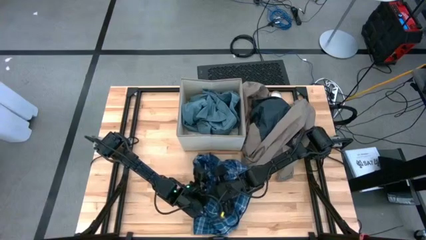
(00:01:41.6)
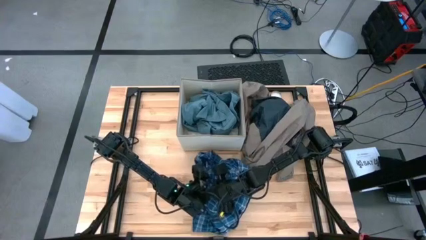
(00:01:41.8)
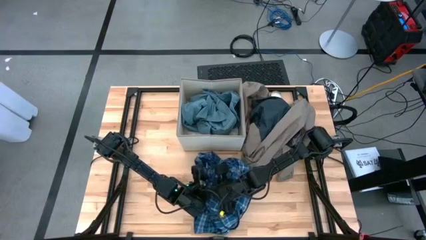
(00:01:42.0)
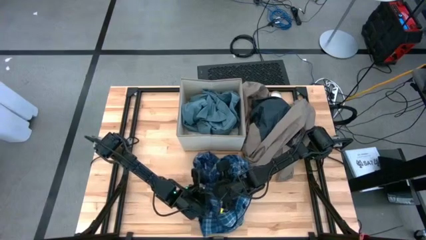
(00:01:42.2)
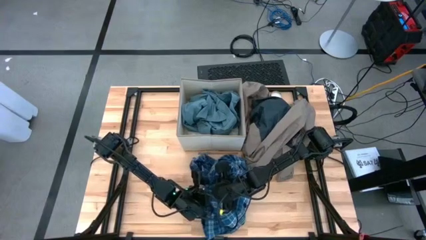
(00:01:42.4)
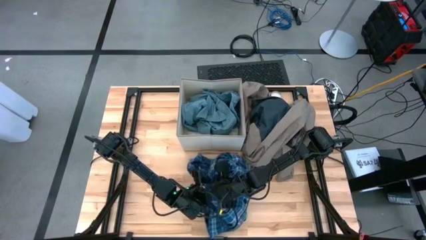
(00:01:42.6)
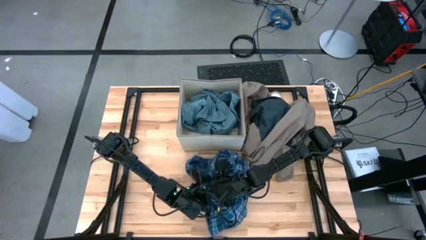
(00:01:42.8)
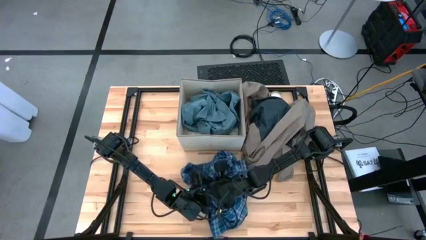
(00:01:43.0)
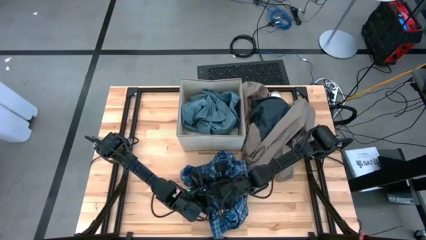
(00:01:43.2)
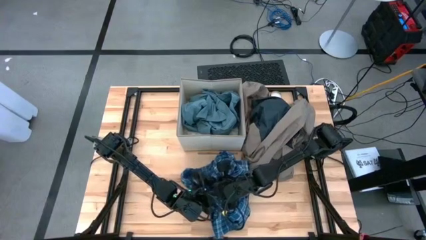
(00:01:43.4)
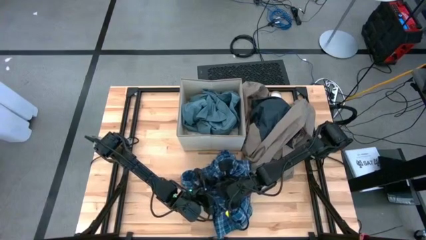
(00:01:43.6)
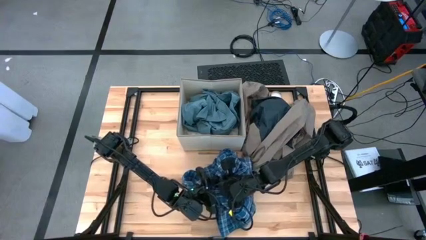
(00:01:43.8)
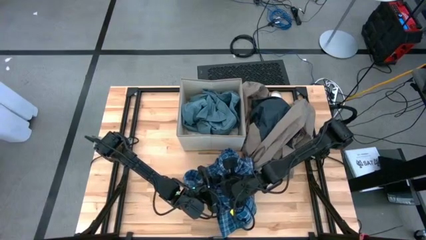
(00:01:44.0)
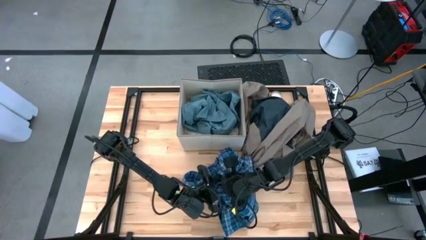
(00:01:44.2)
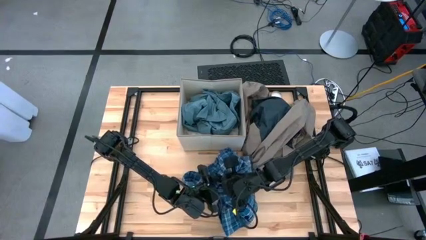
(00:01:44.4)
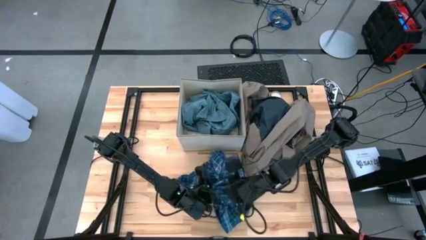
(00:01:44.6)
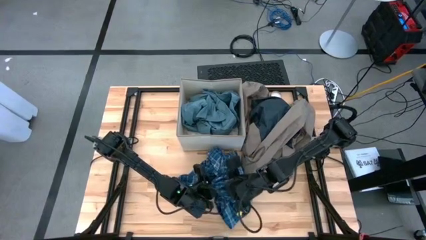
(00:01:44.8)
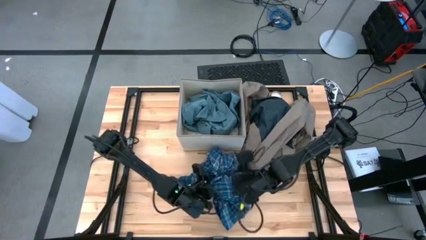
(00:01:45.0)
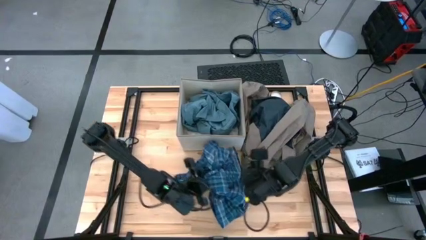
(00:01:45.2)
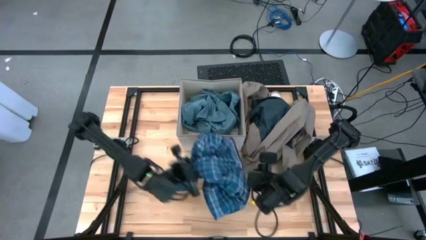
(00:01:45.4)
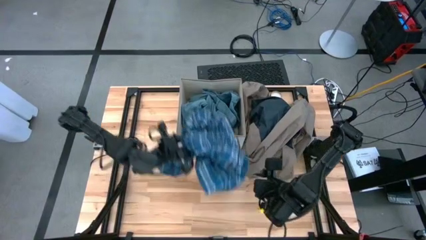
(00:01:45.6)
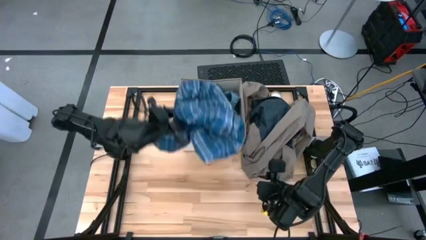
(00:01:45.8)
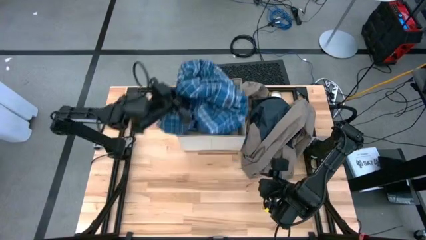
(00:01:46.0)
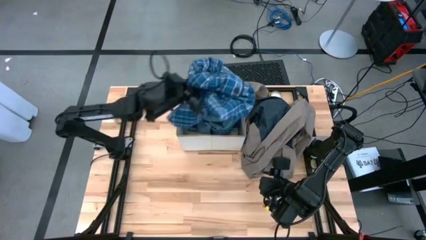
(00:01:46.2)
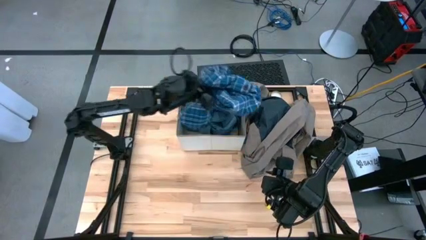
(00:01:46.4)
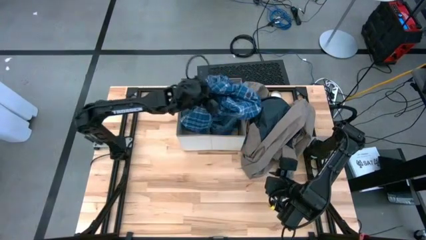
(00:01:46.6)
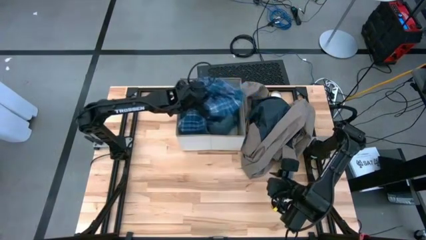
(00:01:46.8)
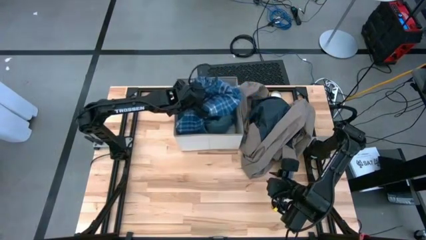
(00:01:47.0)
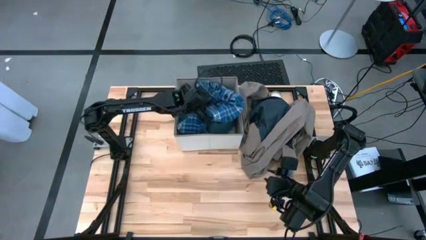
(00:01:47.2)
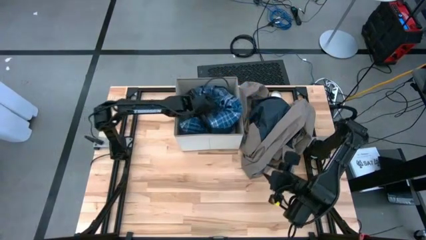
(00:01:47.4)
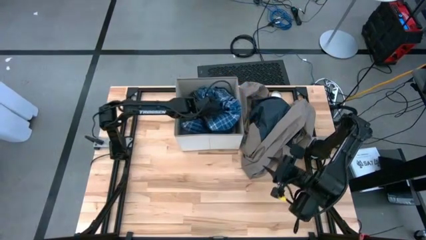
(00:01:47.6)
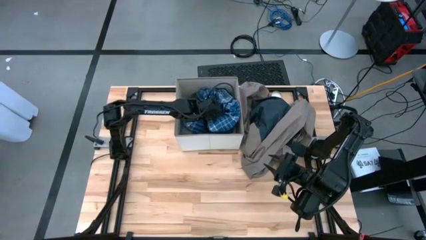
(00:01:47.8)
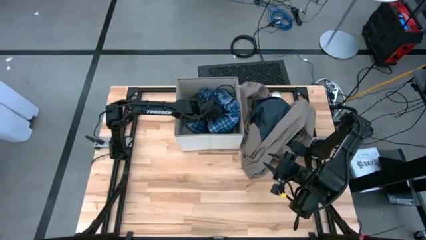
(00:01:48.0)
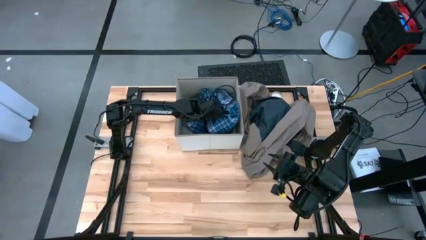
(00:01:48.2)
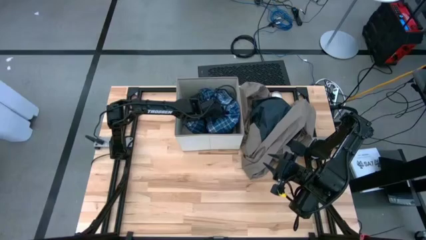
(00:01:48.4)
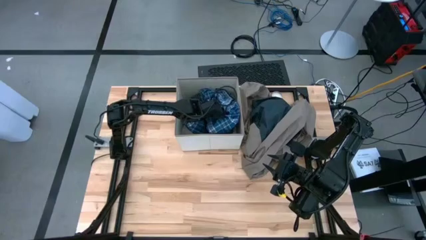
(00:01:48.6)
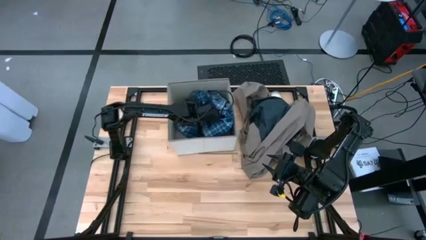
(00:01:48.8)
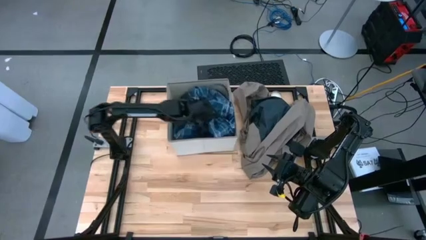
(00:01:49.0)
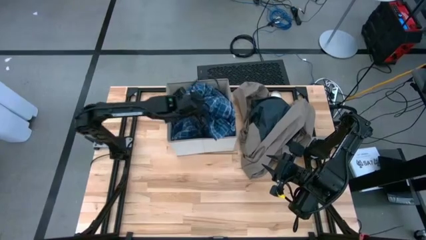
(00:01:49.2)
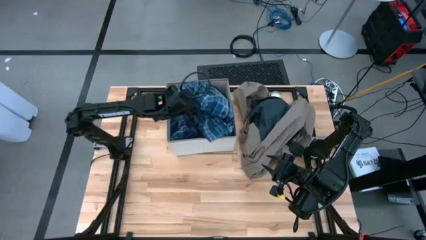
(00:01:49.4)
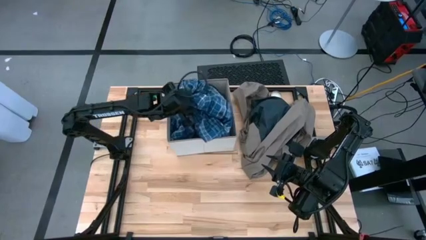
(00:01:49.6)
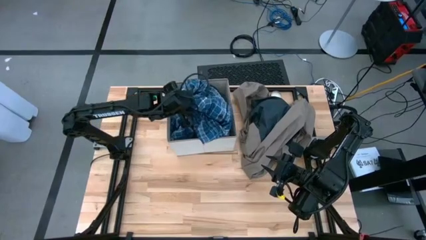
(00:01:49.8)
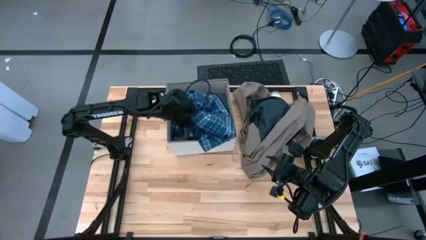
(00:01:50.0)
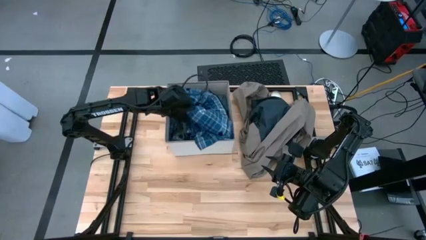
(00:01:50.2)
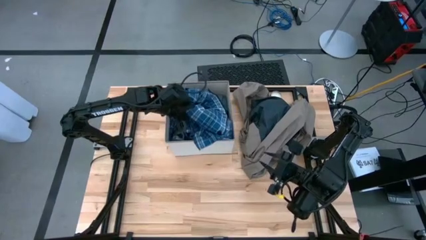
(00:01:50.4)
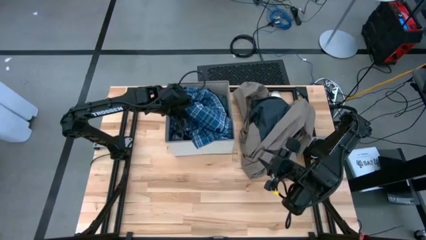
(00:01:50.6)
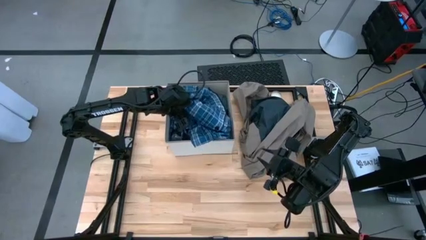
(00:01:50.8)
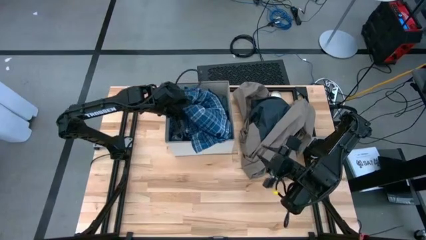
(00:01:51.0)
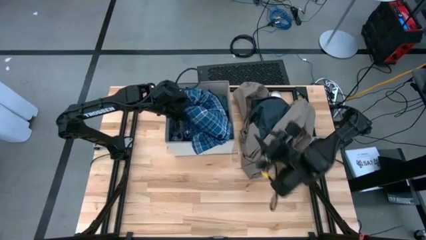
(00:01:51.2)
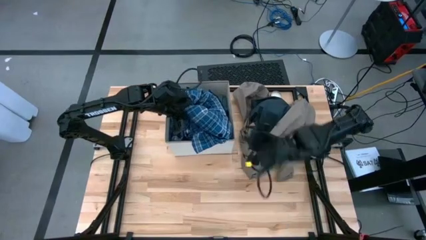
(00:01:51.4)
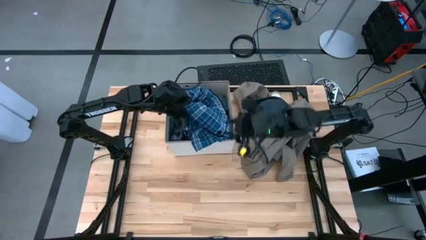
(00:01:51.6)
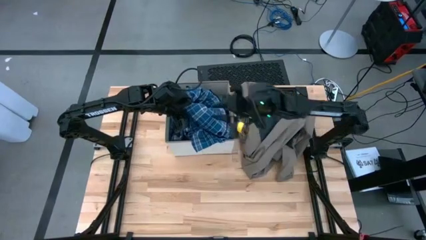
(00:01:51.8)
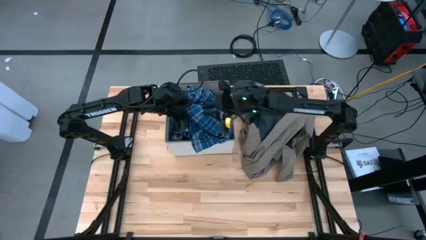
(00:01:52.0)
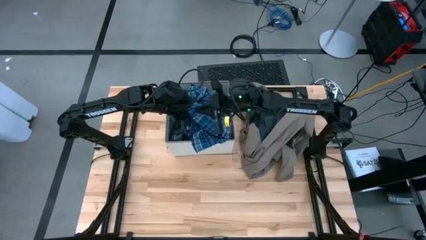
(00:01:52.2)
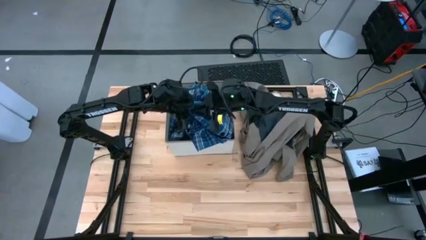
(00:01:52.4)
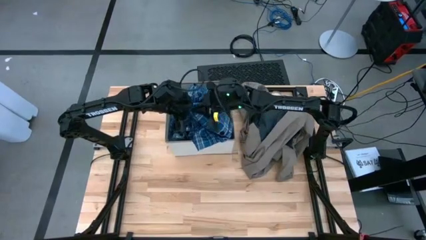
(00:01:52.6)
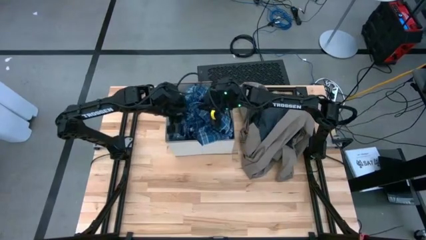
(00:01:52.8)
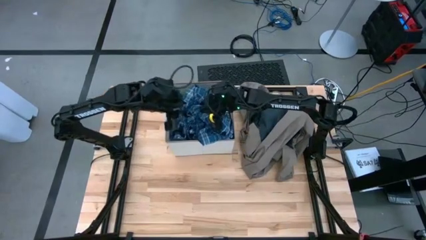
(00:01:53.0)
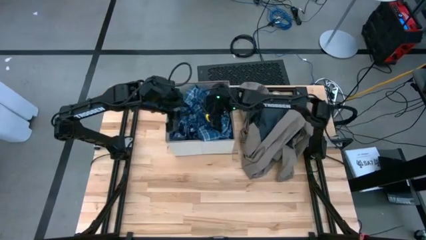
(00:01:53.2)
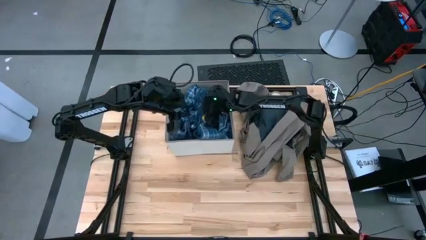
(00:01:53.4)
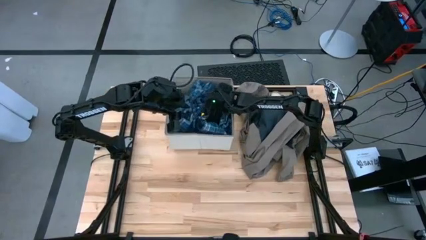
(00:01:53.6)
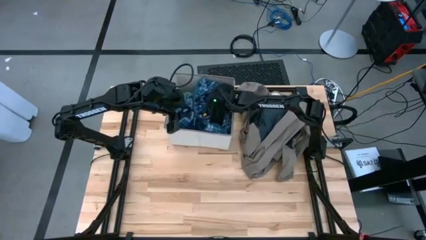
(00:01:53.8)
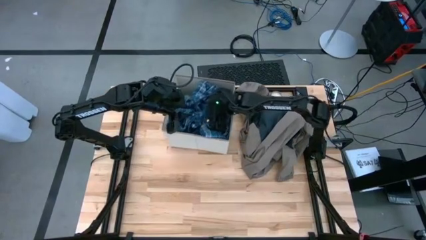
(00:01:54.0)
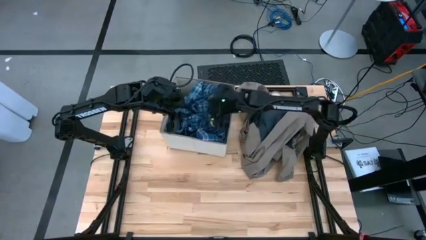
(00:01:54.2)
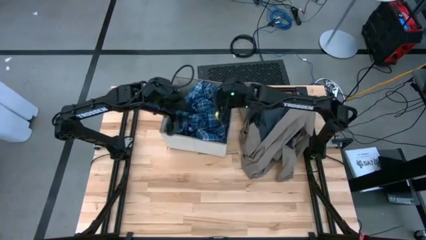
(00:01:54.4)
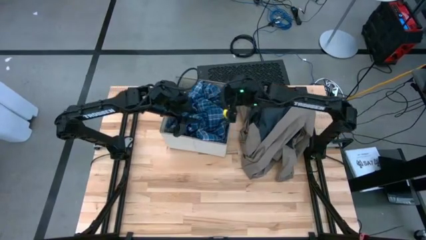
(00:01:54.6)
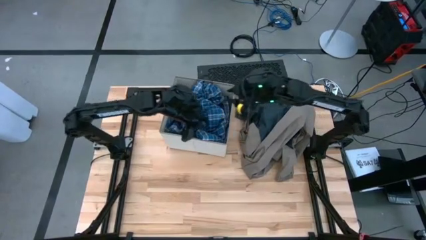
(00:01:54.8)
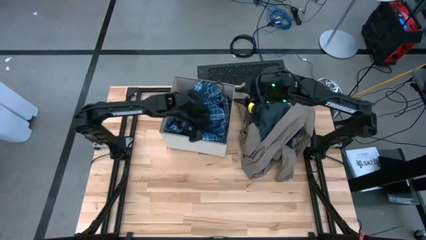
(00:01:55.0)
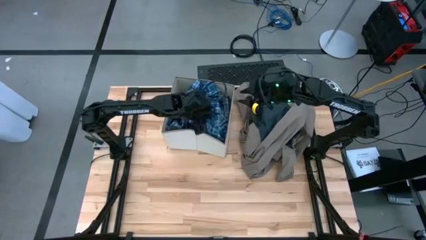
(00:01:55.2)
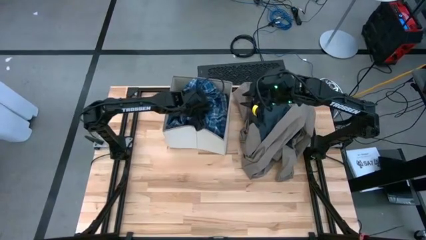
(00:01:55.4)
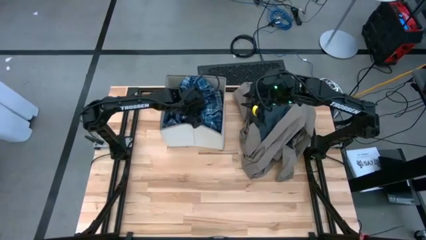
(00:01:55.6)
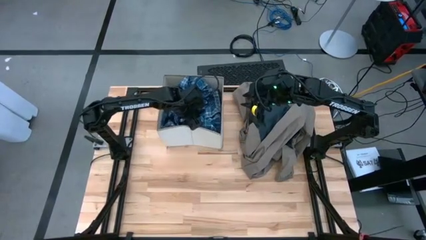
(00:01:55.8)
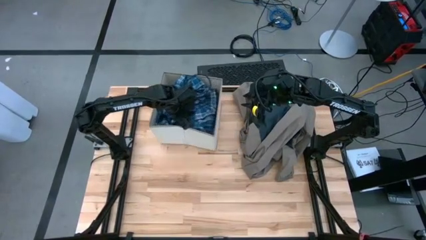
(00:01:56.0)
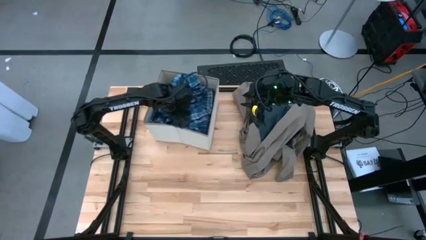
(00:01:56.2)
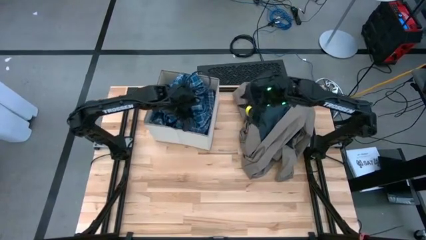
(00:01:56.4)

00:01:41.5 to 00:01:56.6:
Task: Sort clothes
Put the blue polo shirt into the laundry organizer

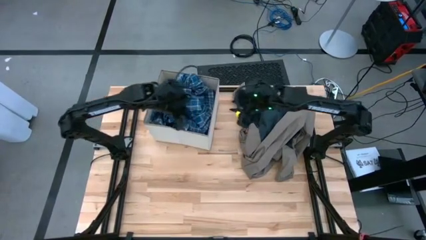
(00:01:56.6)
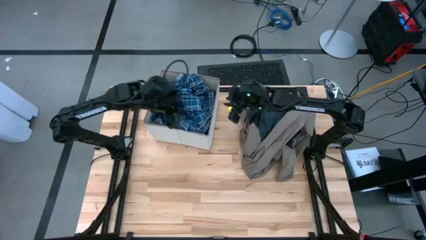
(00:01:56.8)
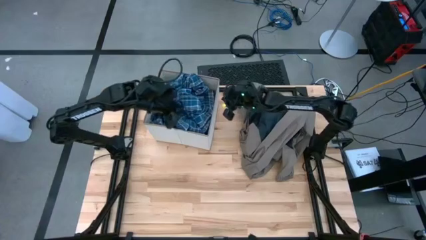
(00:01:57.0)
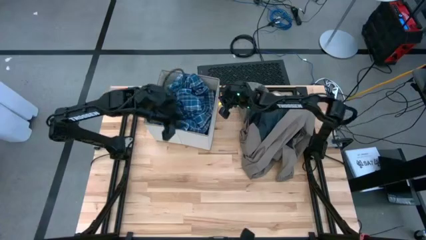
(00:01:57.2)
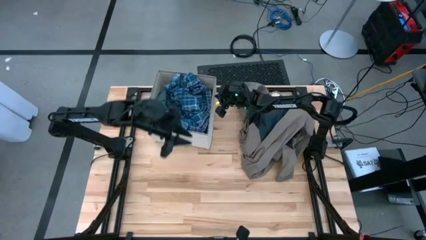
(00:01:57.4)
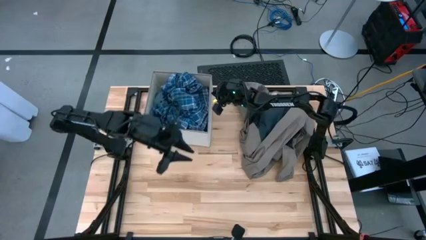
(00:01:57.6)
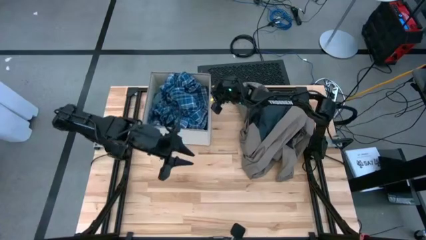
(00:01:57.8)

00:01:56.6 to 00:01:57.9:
Adjust the laundry organizer
